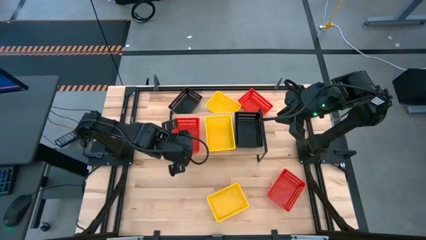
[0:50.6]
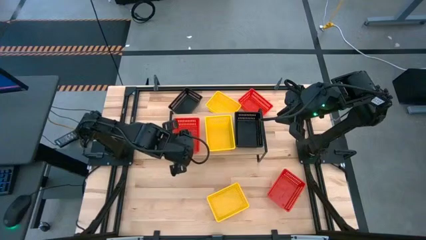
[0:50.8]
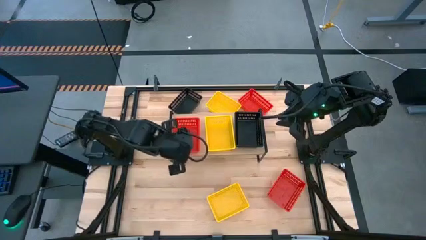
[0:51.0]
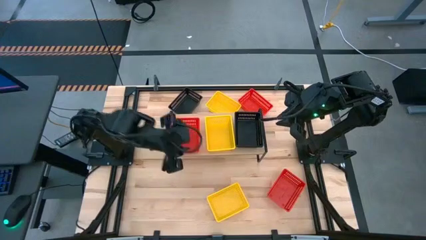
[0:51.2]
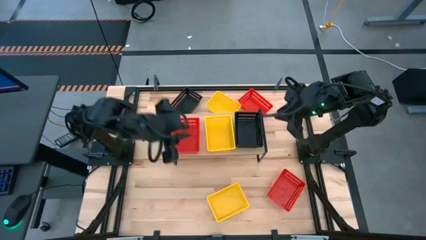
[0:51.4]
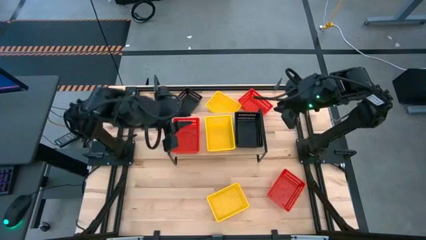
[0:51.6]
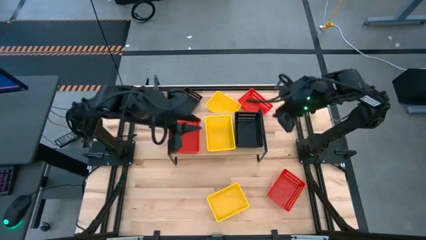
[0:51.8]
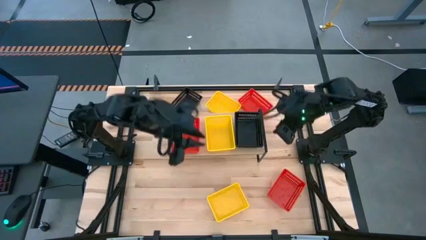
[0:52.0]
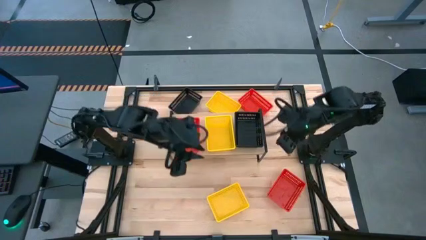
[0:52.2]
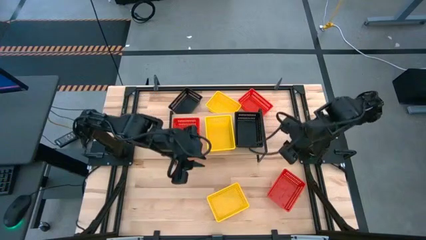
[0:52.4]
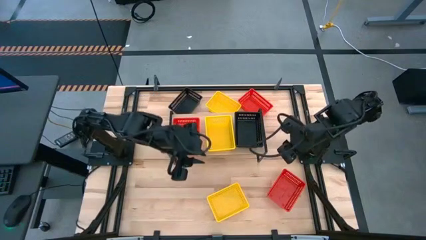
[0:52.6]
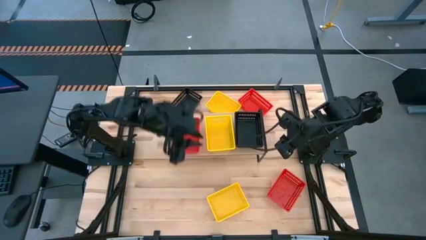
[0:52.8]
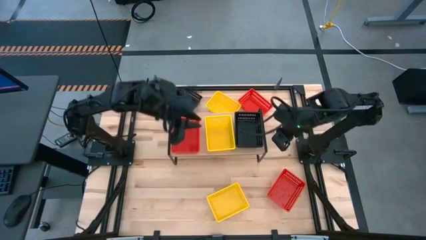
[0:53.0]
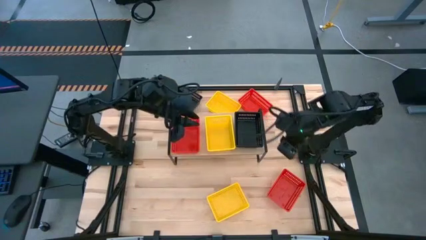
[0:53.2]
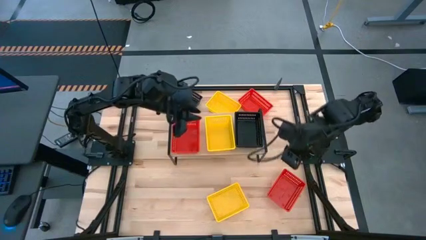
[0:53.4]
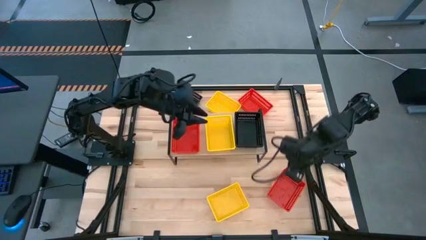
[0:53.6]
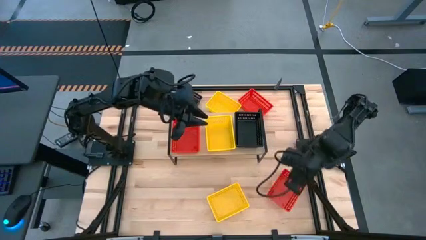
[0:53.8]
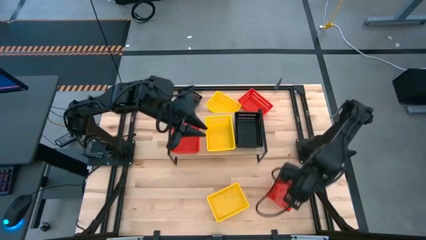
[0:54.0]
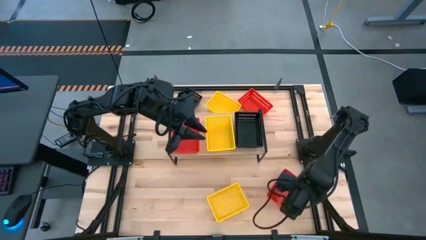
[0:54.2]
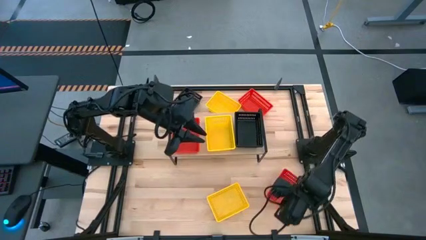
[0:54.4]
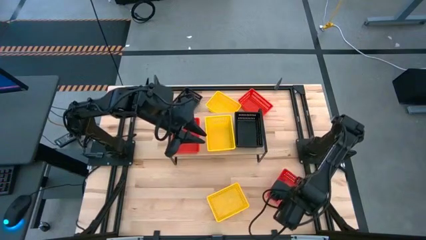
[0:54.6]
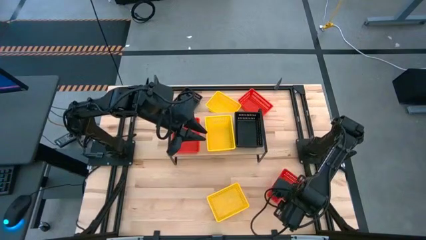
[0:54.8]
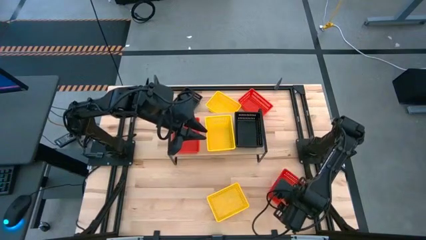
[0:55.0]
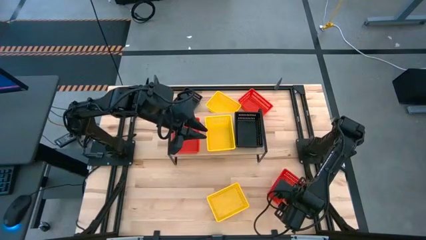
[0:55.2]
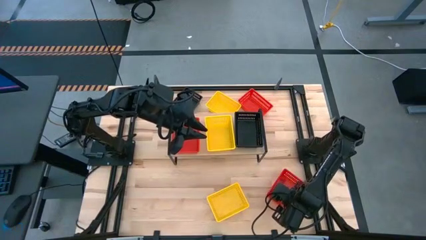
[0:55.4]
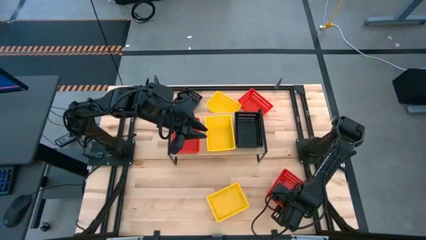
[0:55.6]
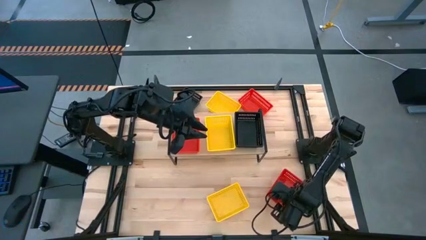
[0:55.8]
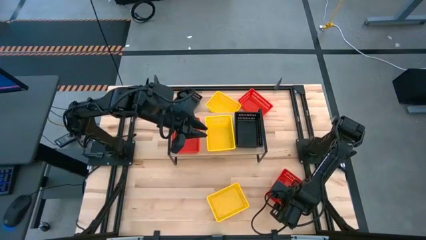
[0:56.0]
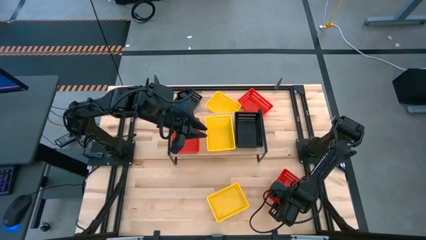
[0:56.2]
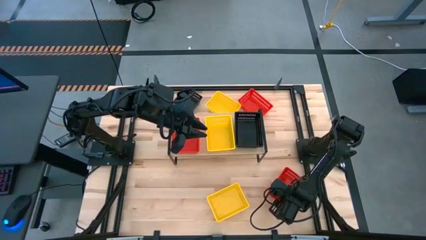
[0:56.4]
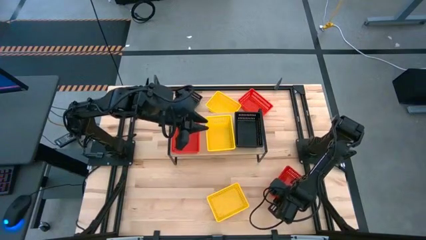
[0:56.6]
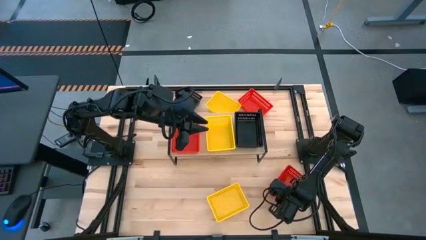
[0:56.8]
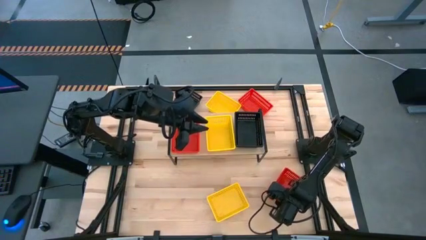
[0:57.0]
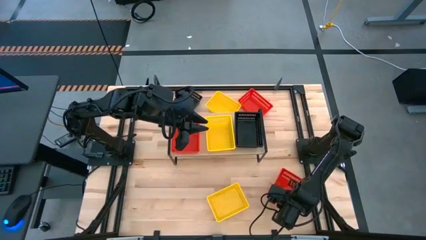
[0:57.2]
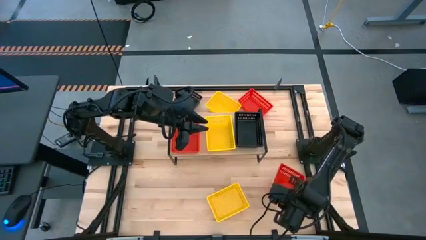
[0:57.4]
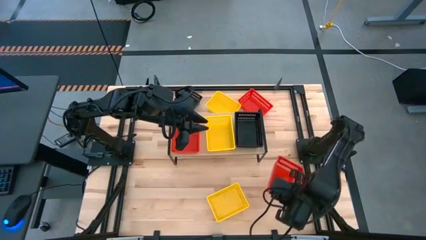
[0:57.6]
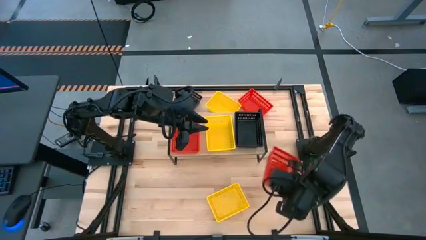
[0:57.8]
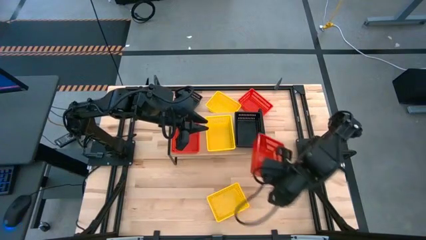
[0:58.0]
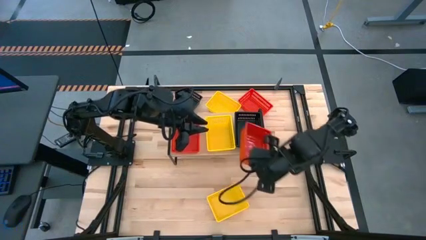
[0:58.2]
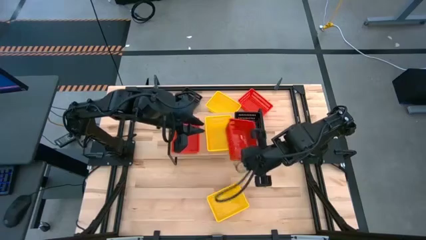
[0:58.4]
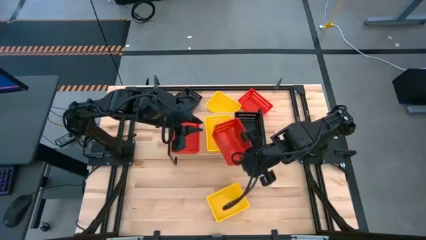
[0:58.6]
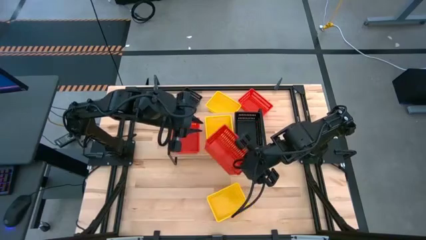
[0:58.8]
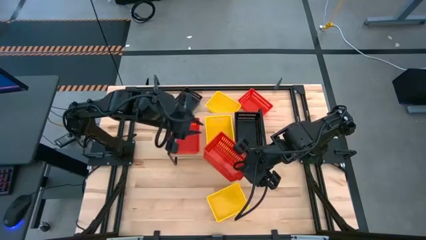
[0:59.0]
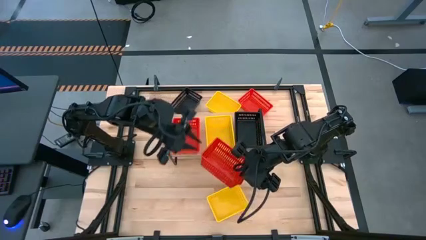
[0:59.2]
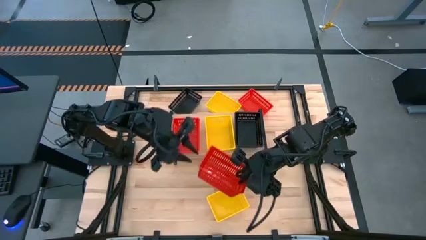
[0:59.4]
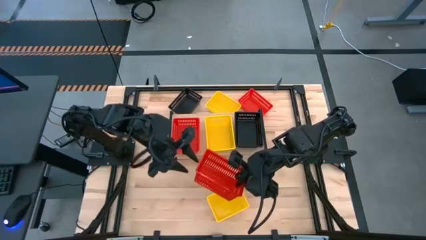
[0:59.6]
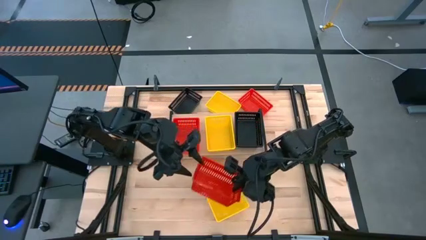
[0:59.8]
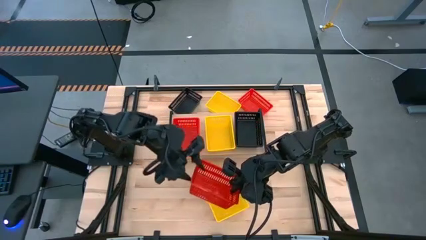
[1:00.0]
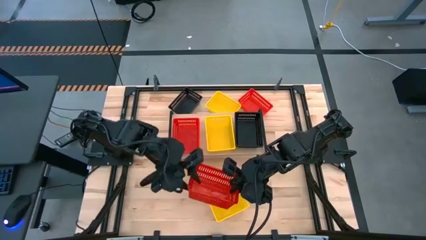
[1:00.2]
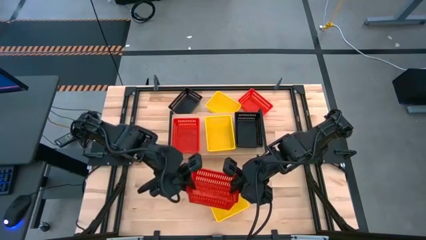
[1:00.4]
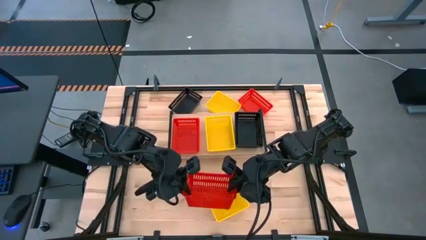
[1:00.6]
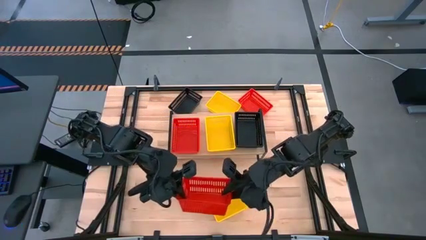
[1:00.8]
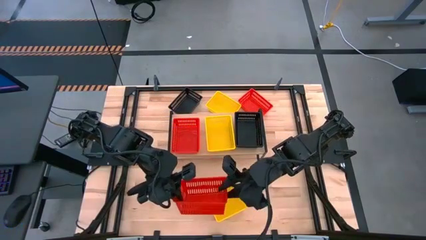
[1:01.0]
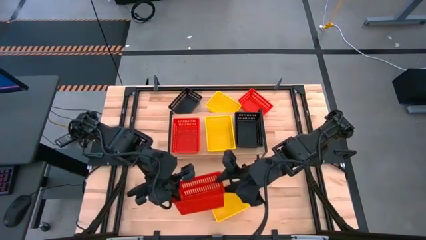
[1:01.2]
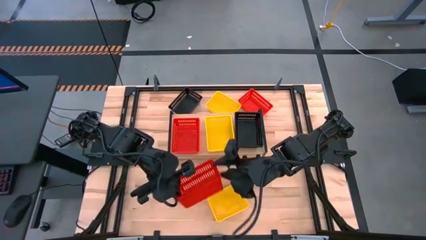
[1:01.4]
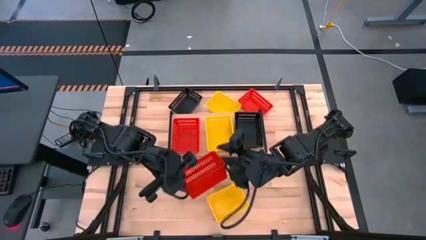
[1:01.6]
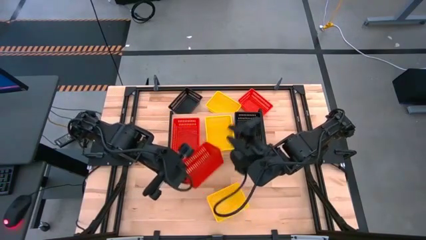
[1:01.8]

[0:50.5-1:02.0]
Task: Stack baskets on shelf by color
Stack the bottom red bin on top of the red bin on the shelf

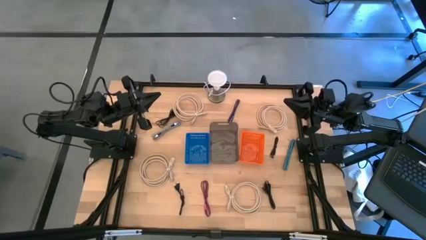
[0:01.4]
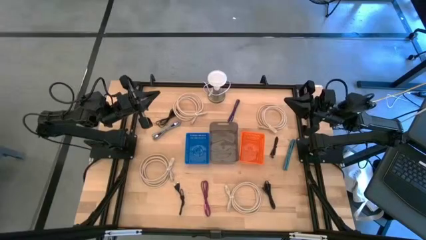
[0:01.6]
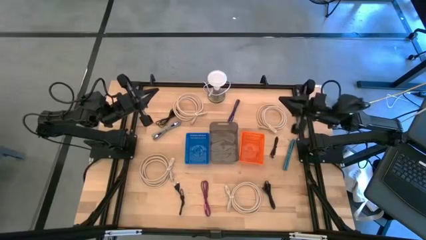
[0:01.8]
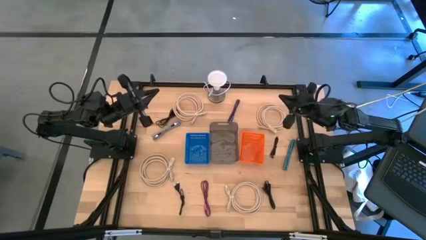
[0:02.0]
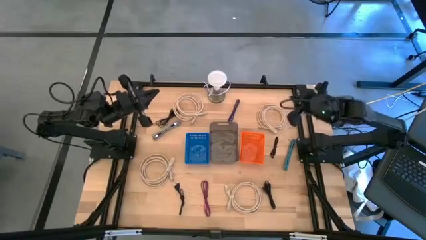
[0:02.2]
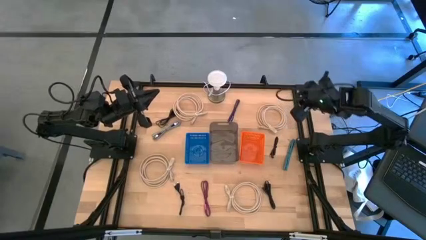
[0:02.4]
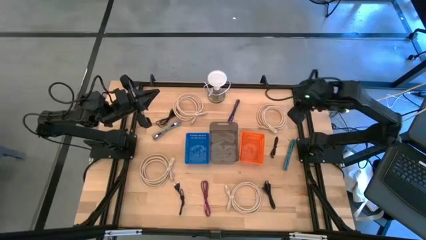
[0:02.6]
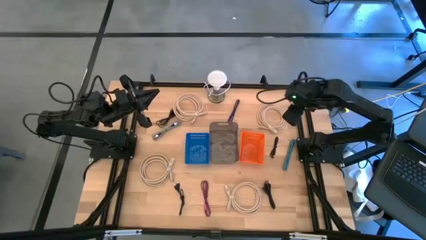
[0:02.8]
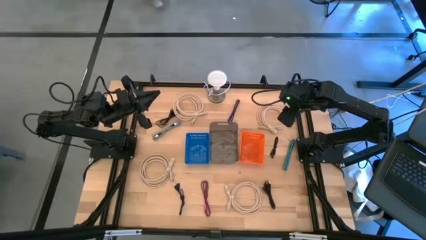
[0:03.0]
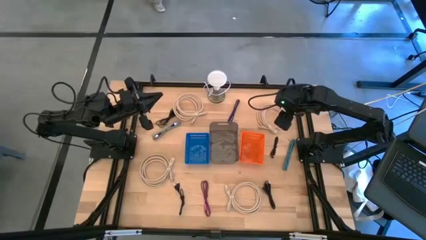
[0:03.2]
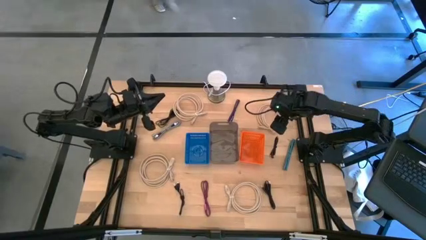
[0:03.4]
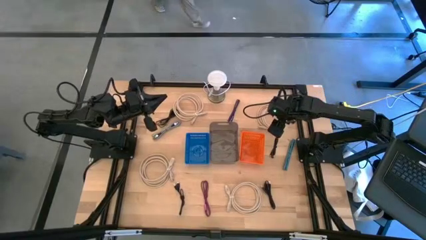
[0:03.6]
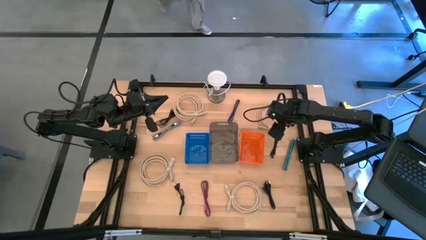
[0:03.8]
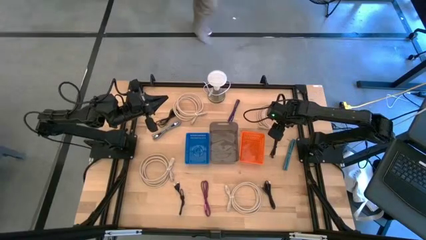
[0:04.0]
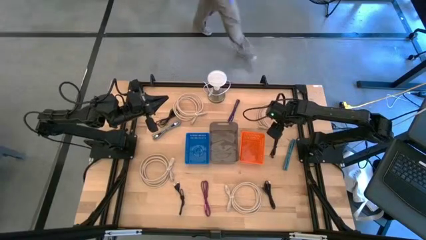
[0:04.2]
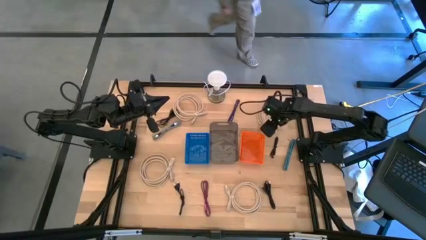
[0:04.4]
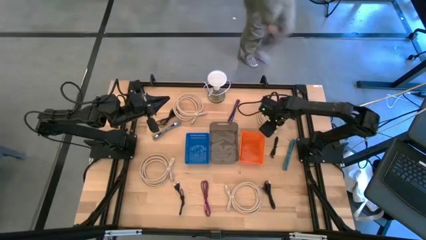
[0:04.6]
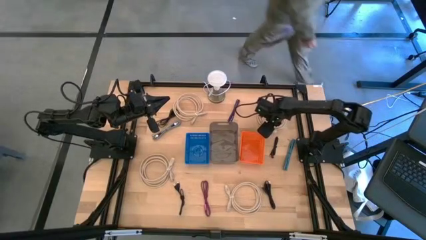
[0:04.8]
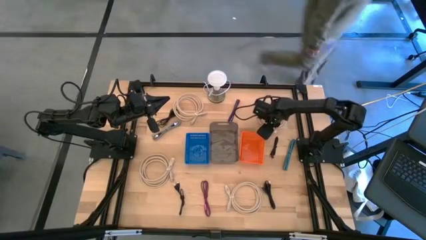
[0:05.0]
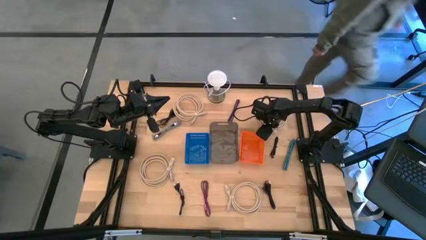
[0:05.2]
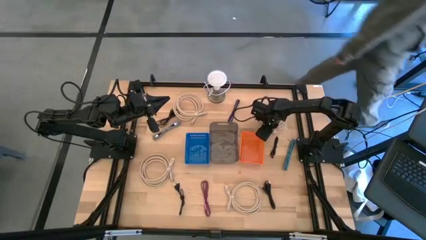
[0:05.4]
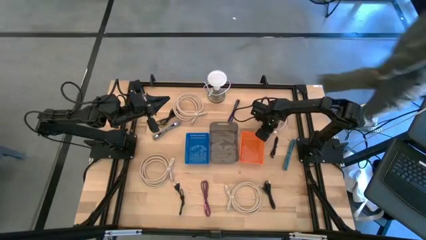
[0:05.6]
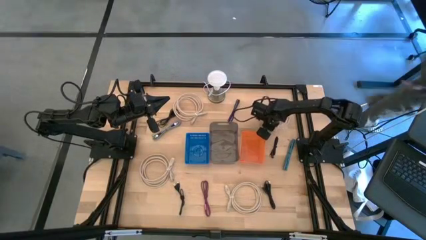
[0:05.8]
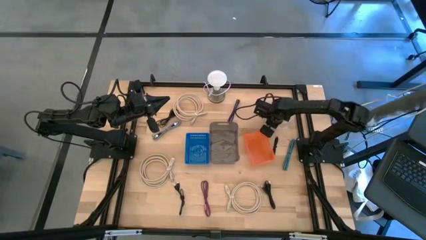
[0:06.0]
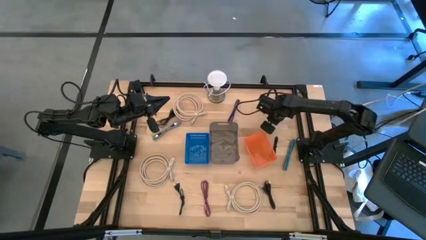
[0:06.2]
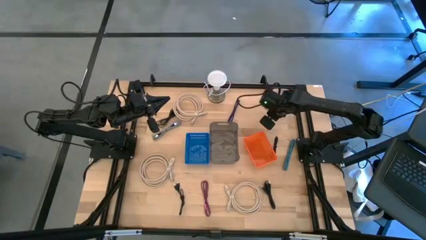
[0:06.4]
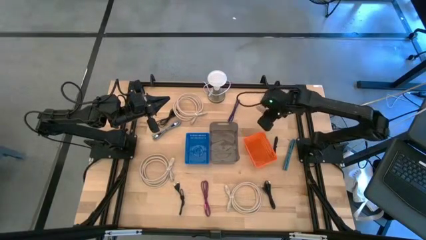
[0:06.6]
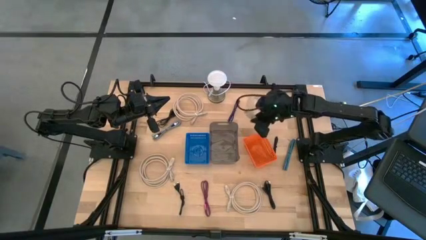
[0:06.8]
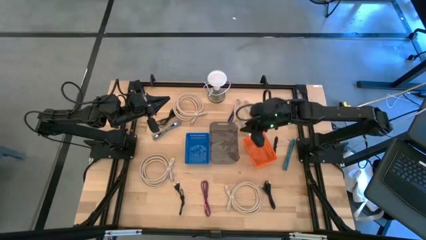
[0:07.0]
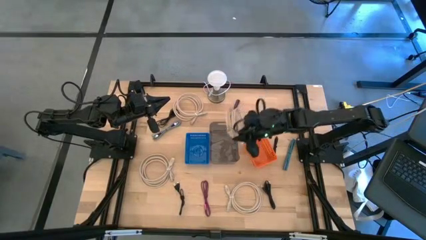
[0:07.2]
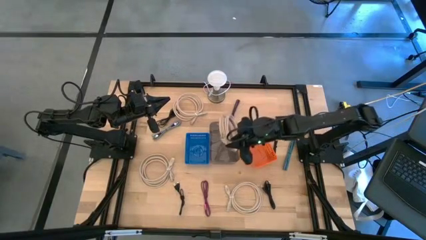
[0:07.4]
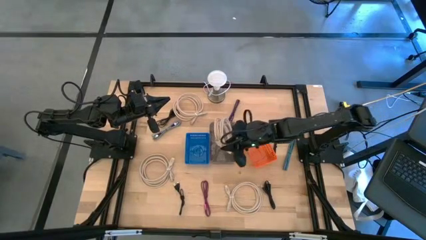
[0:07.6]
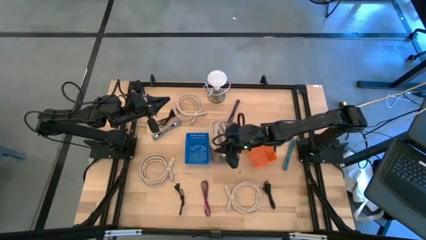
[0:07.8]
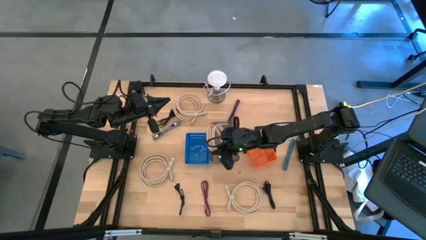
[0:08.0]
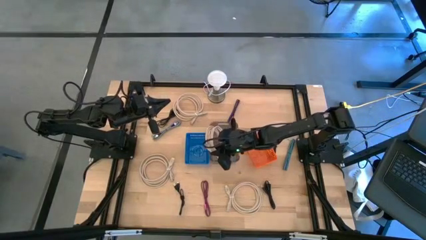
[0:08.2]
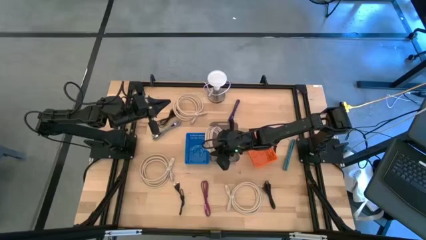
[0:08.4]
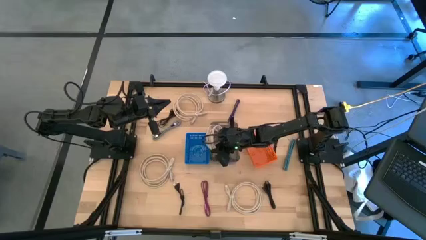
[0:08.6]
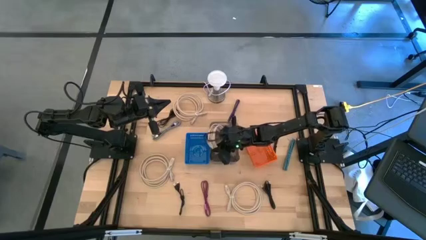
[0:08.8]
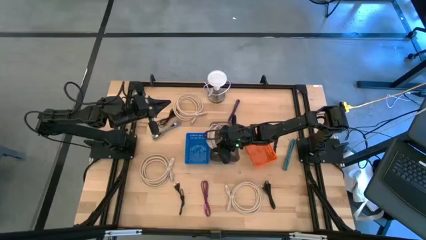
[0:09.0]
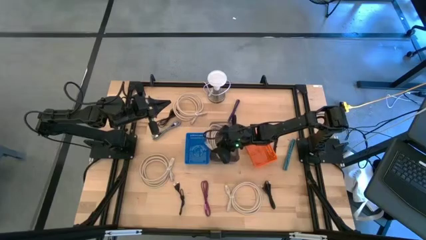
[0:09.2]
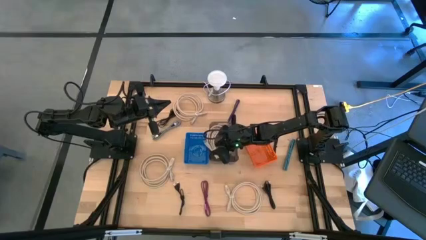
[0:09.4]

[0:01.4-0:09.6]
Task: Pick & Place USB Port
Put the brown HDMI cable into the black bin
